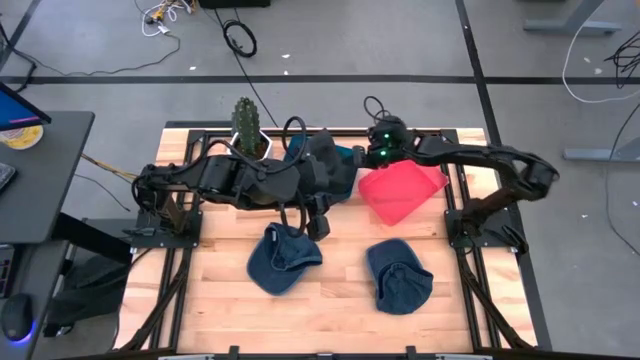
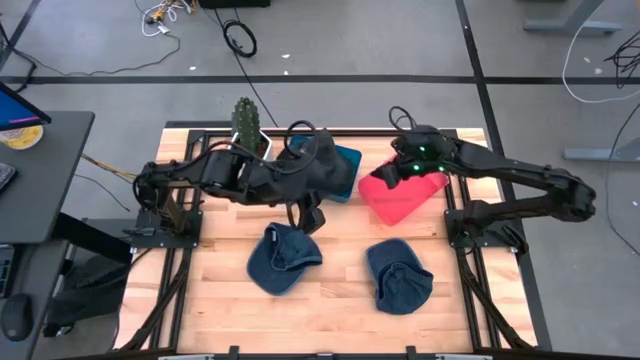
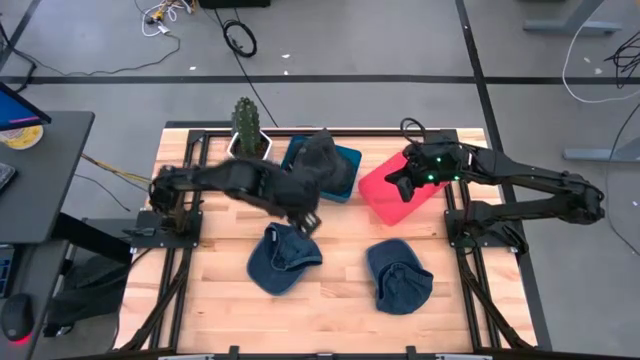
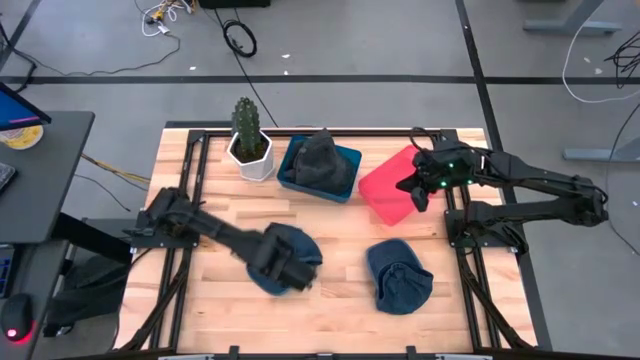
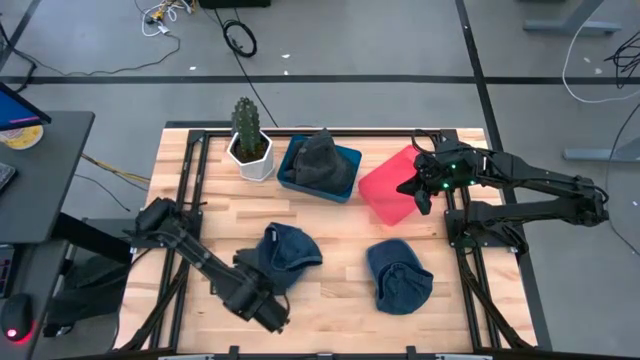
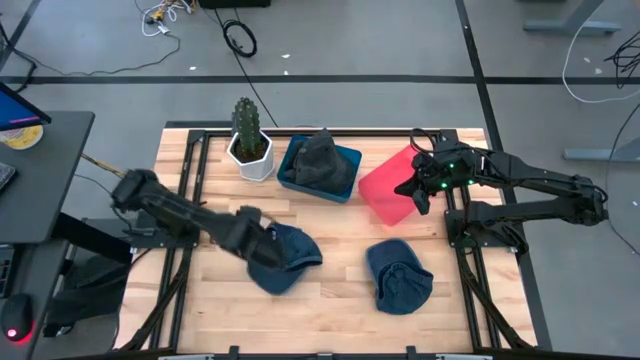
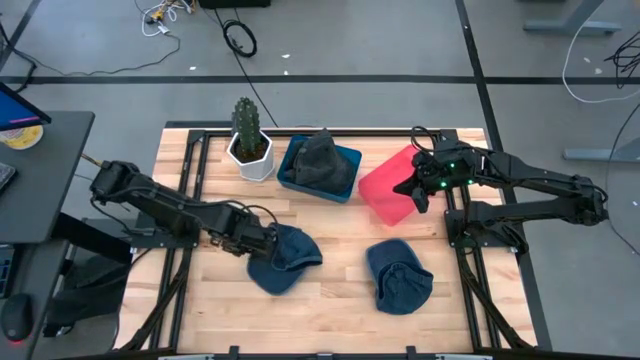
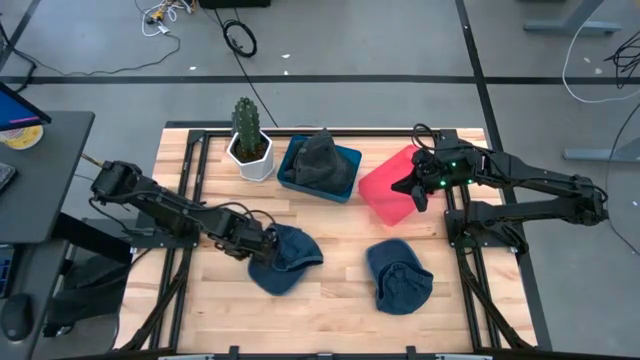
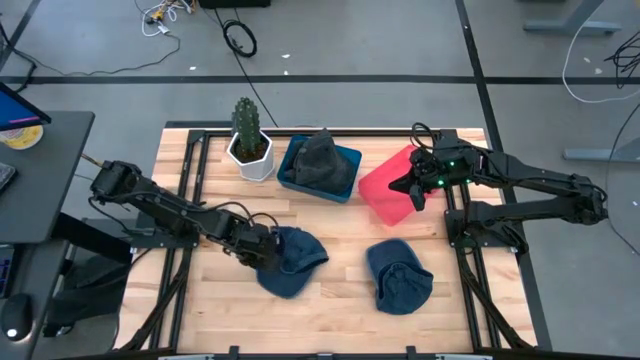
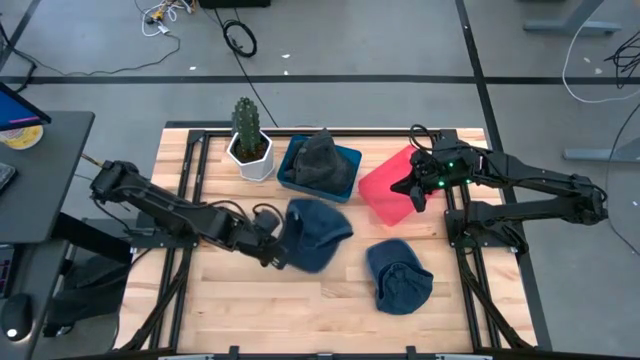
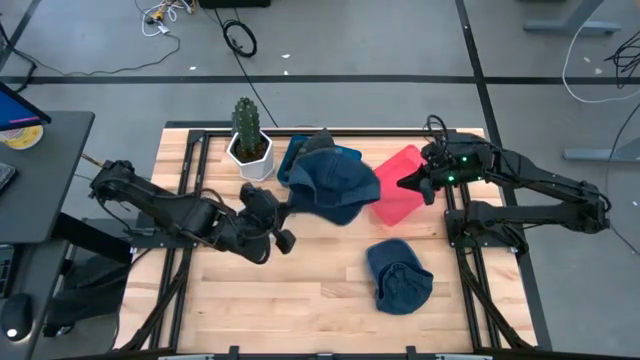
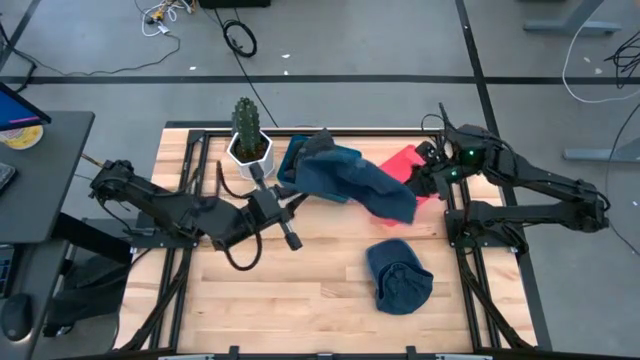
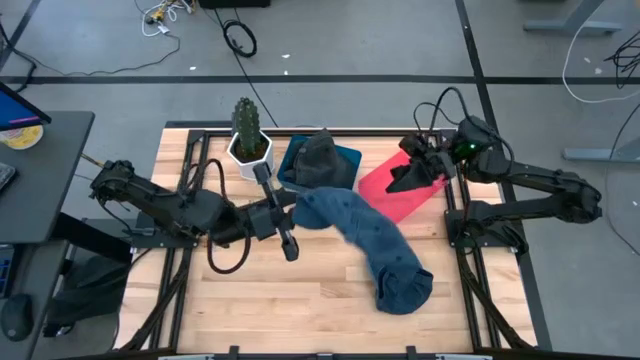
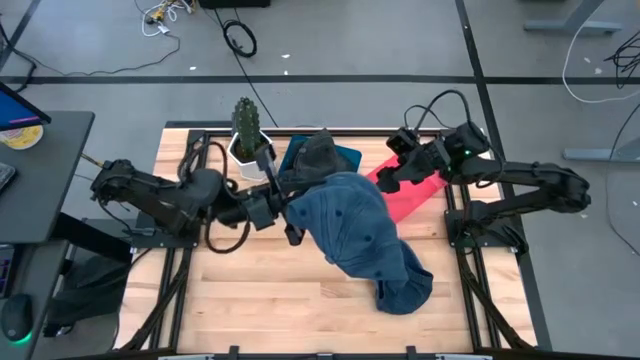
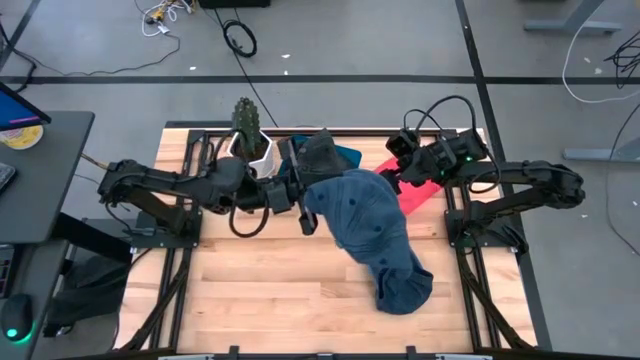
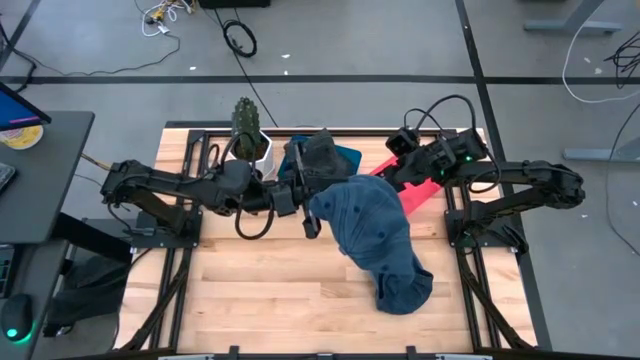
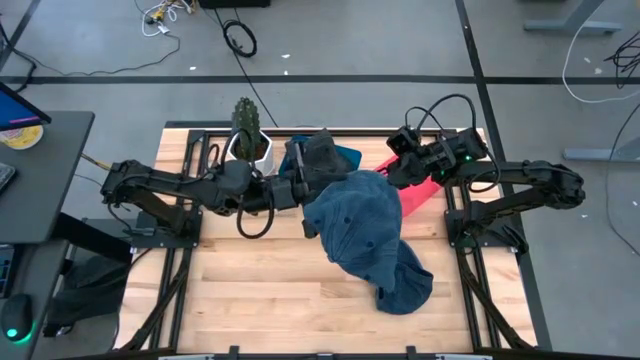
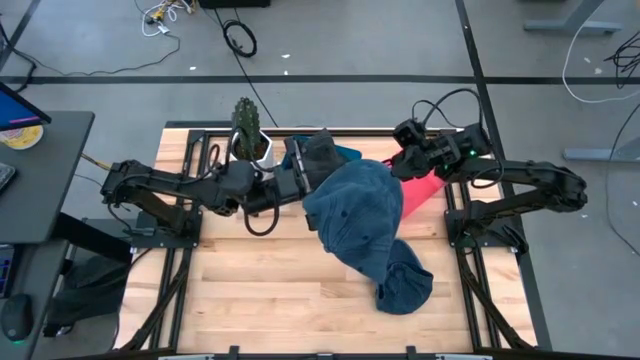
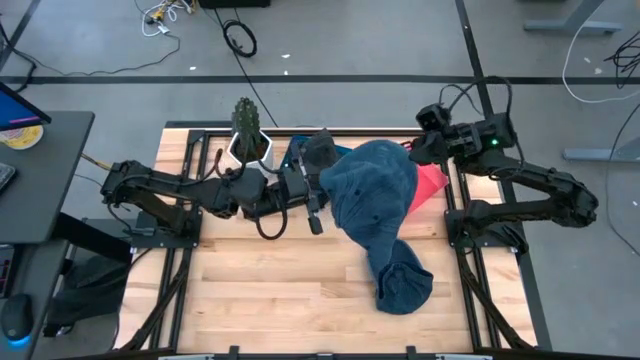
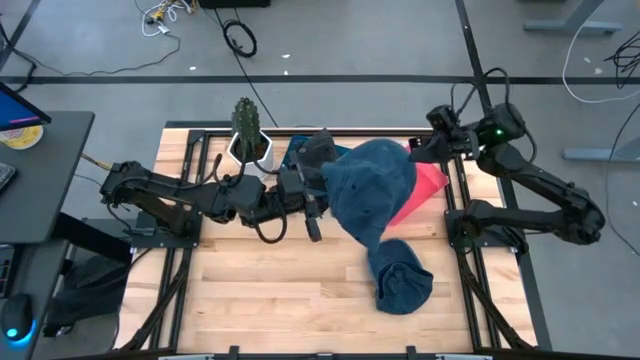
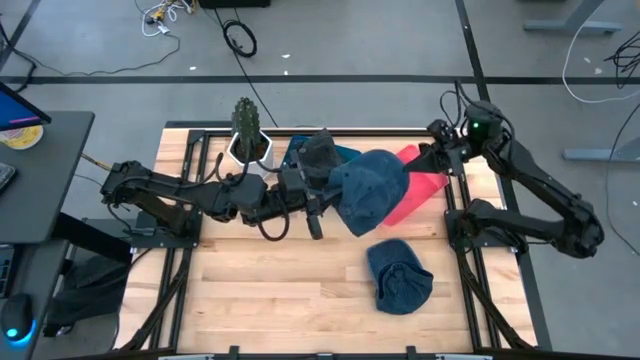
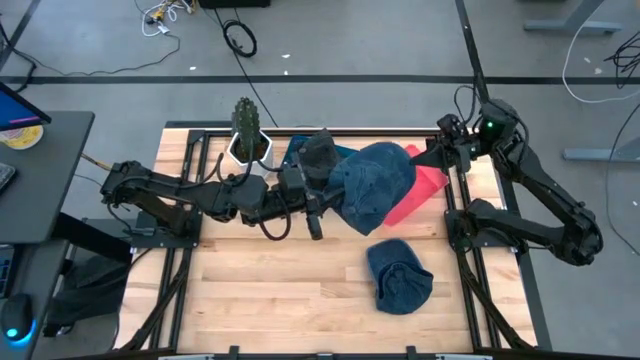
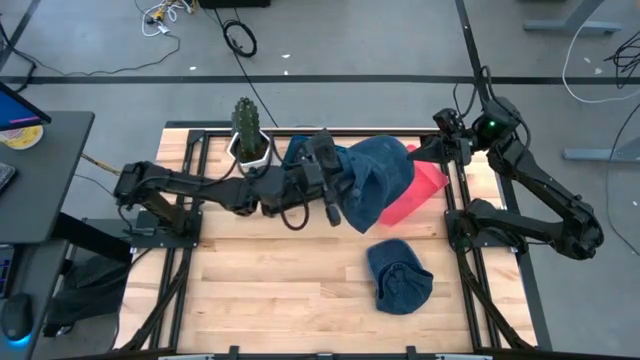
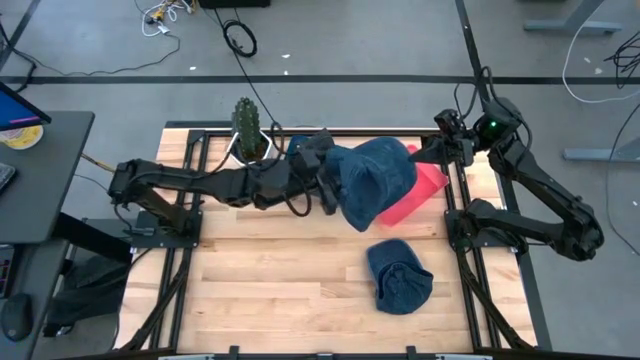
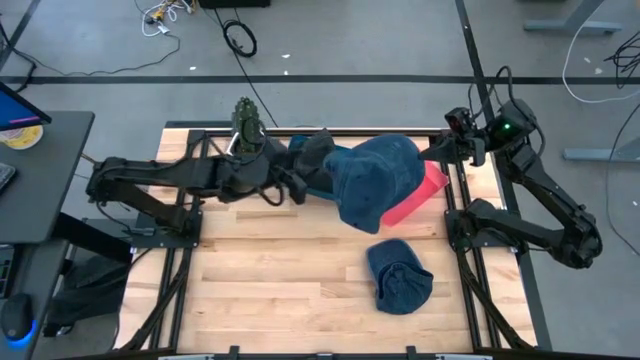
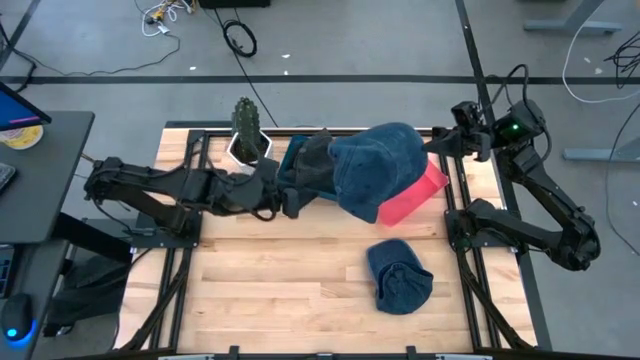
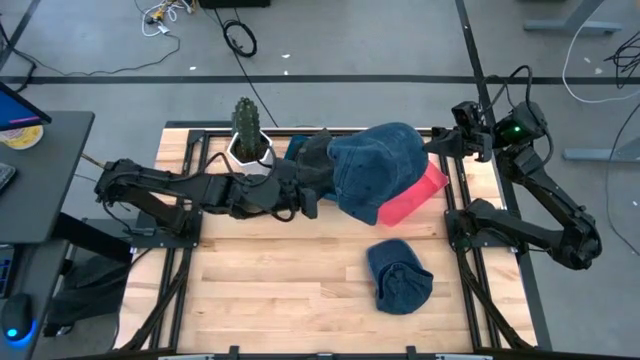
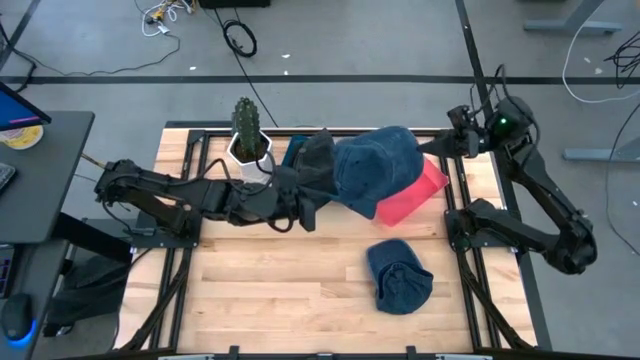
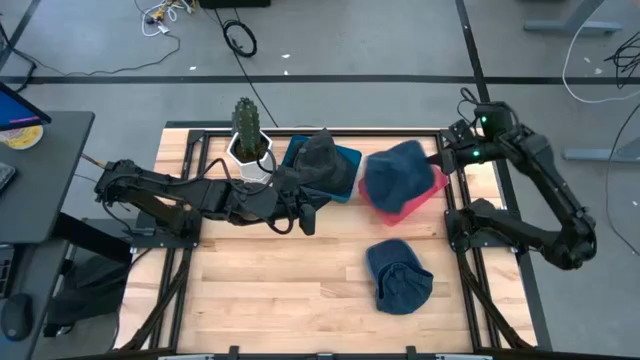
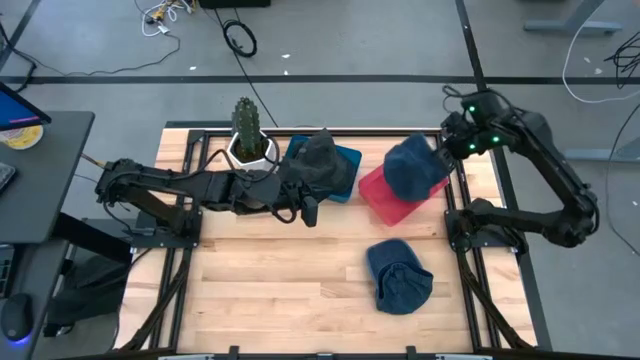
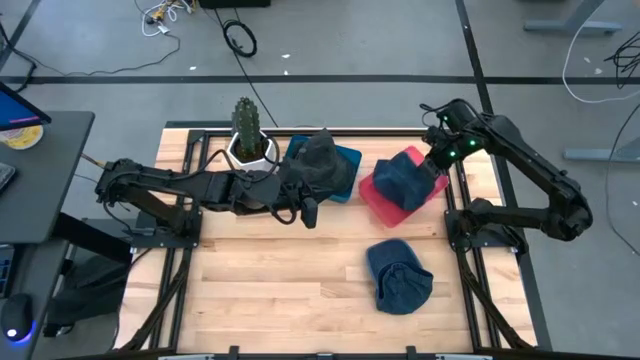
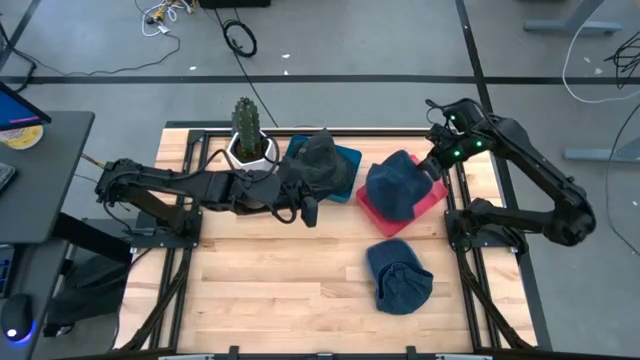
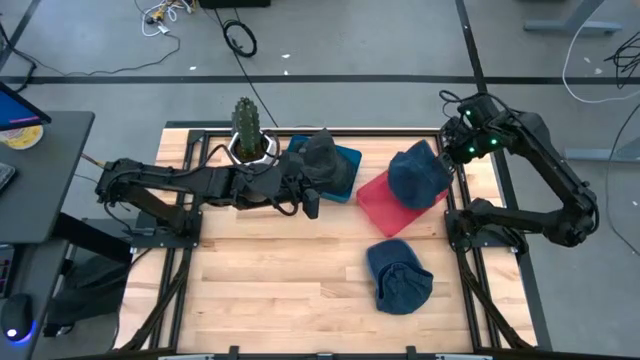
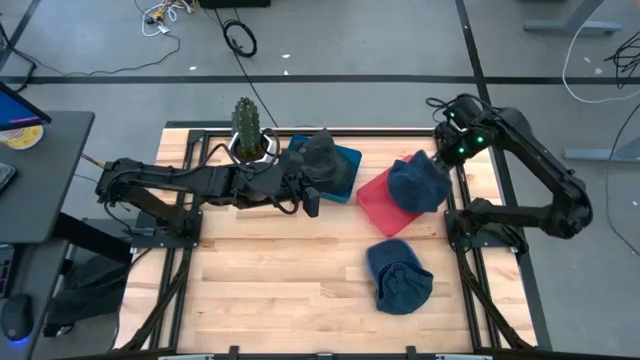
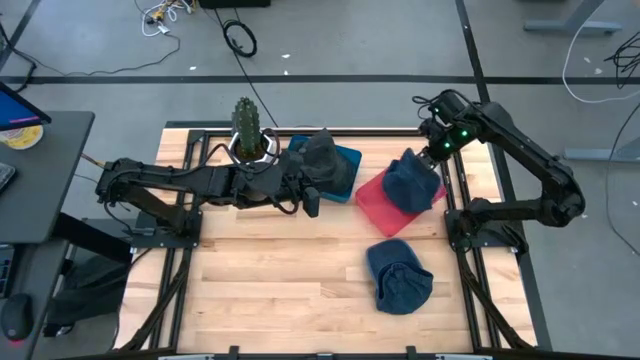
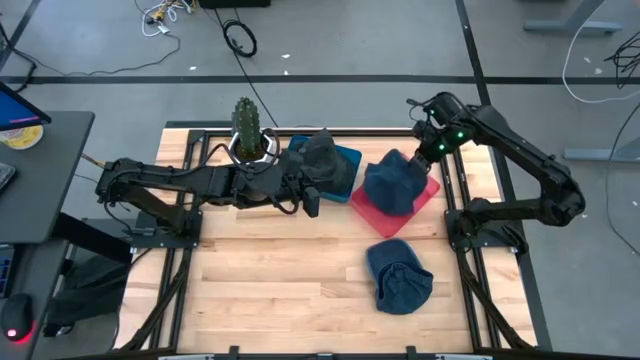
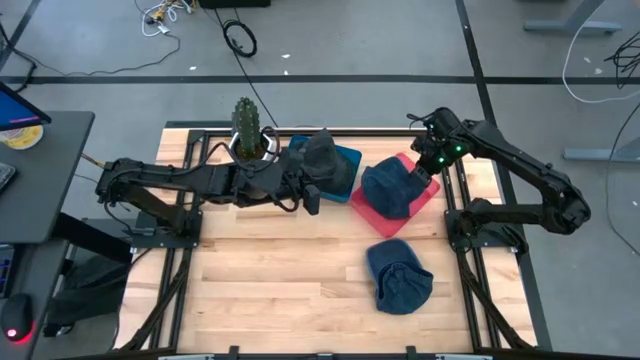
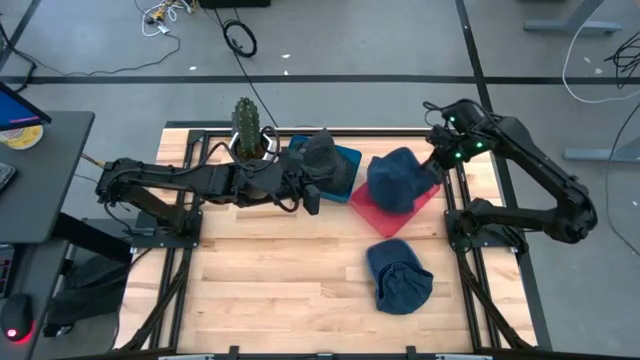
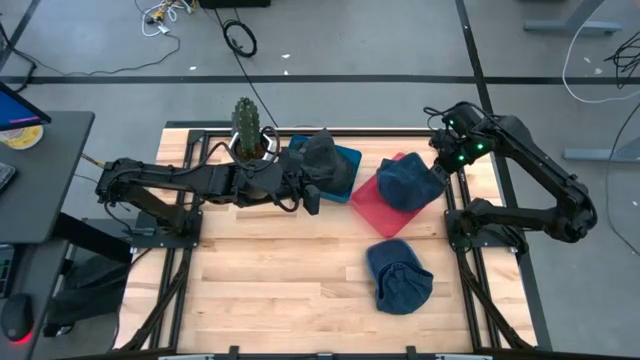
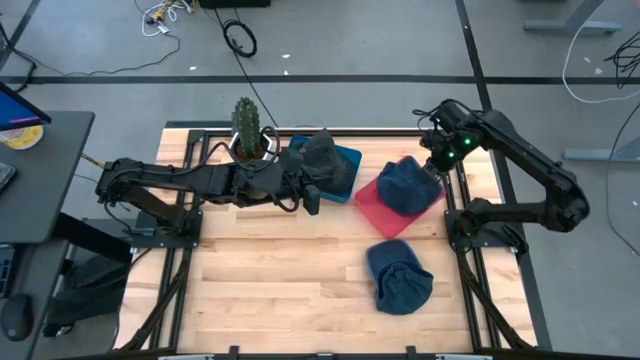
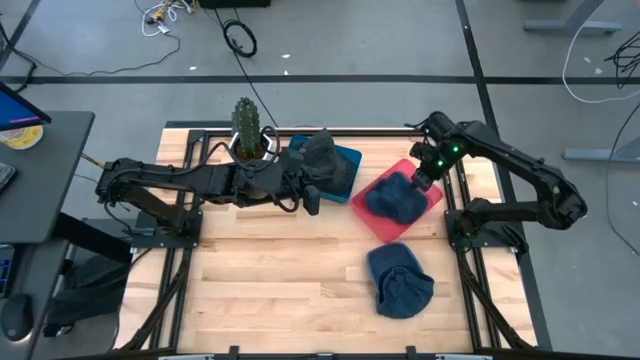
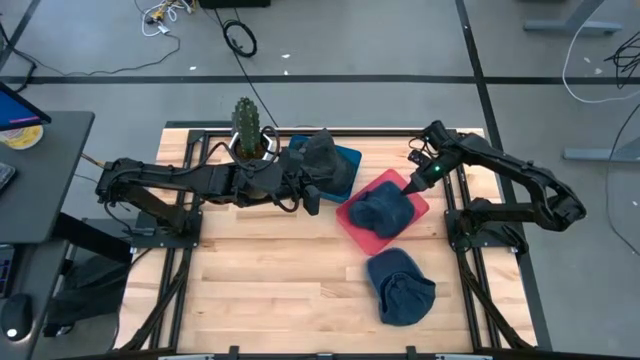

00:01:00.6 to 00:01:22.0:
Task: Pick & Place hat
Put the left blue cap into the pink bin
